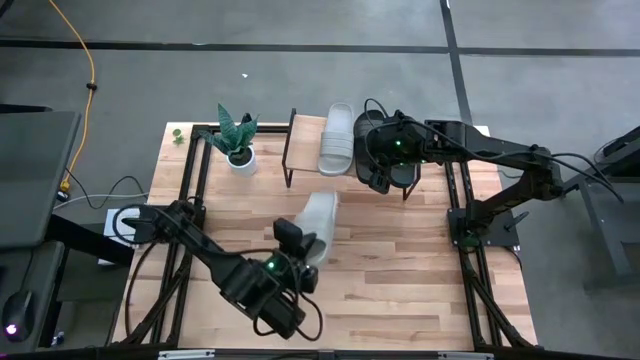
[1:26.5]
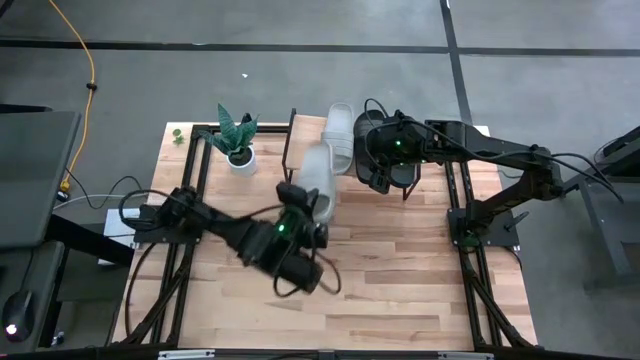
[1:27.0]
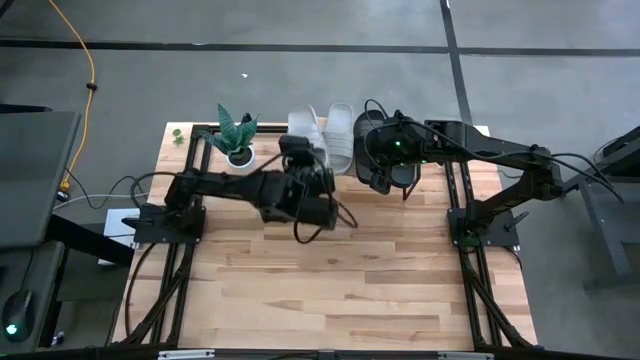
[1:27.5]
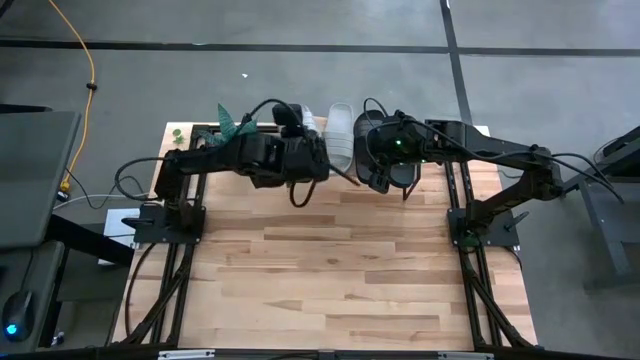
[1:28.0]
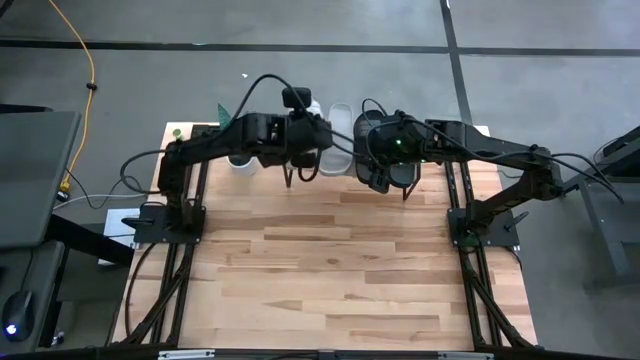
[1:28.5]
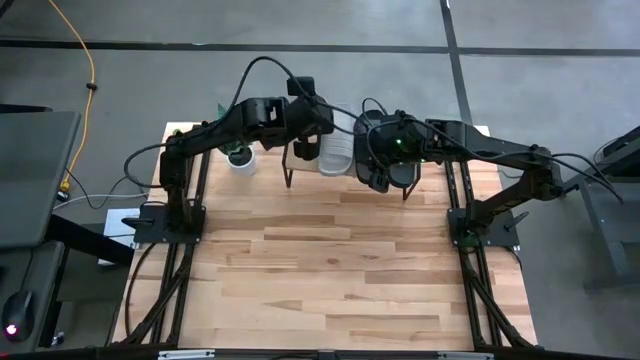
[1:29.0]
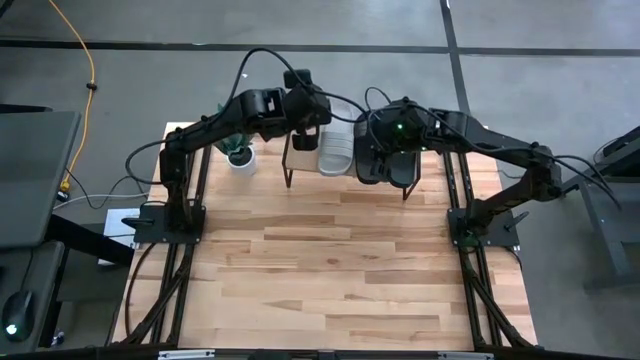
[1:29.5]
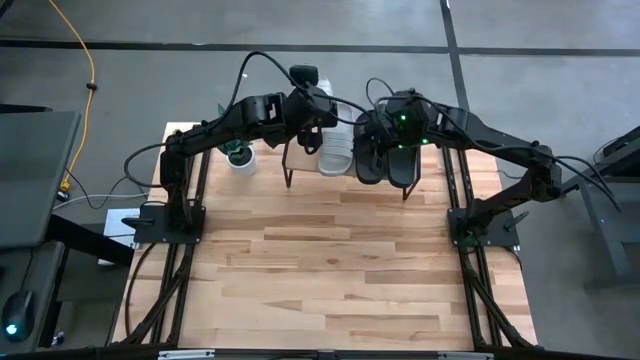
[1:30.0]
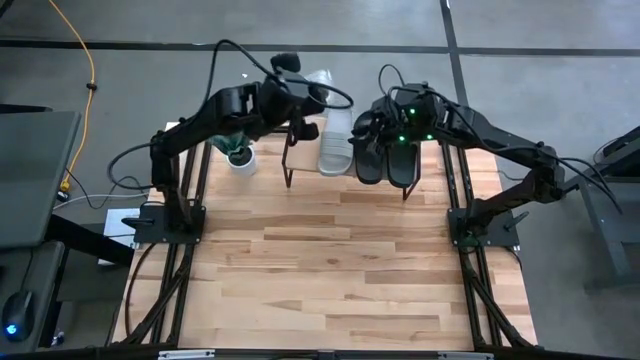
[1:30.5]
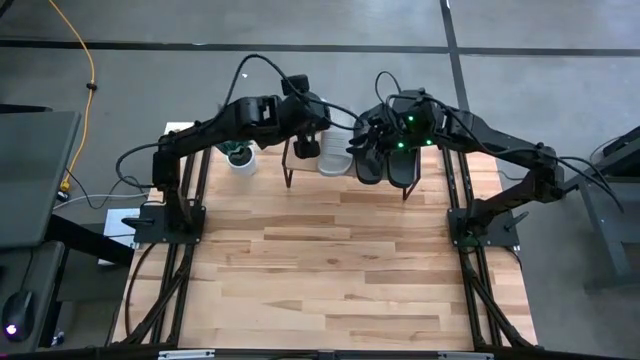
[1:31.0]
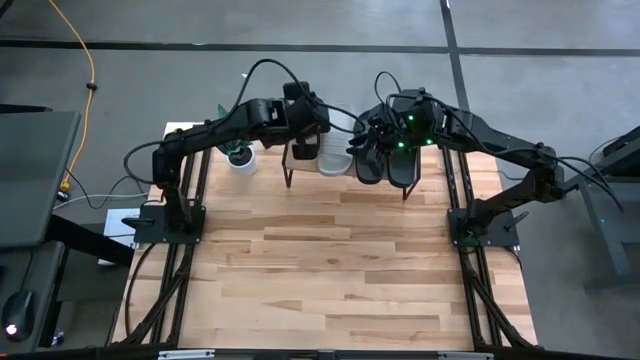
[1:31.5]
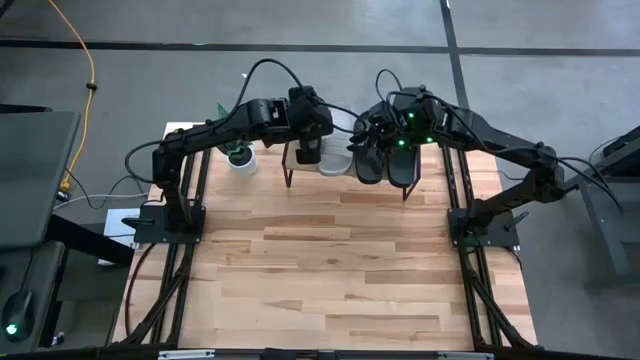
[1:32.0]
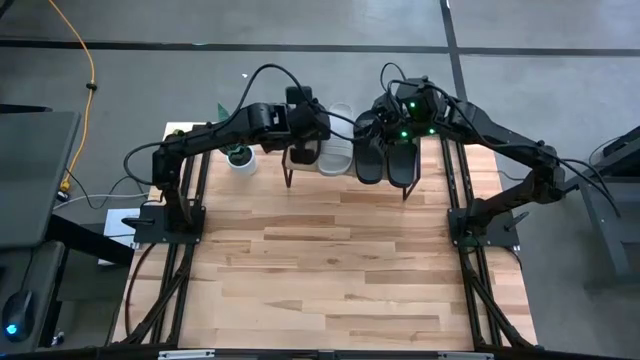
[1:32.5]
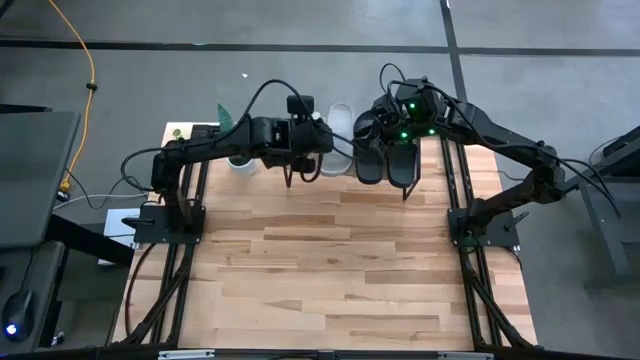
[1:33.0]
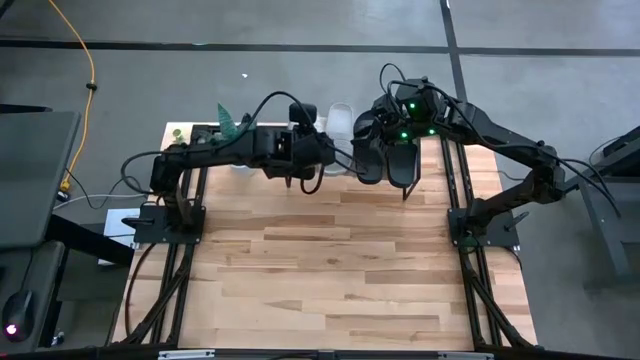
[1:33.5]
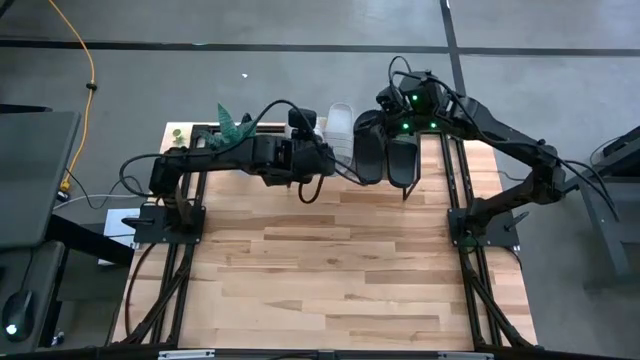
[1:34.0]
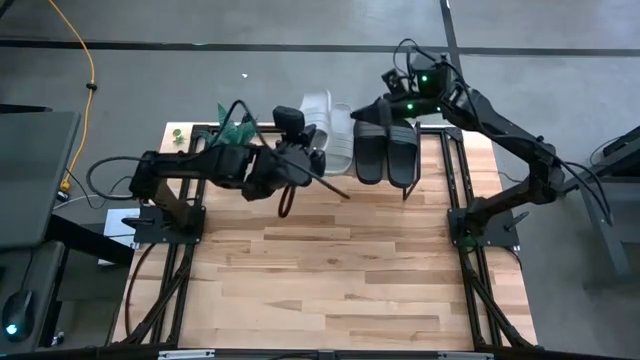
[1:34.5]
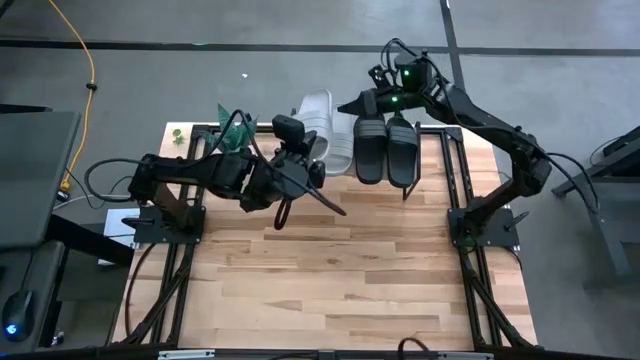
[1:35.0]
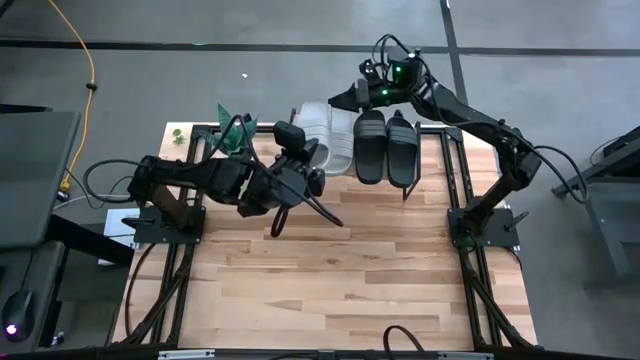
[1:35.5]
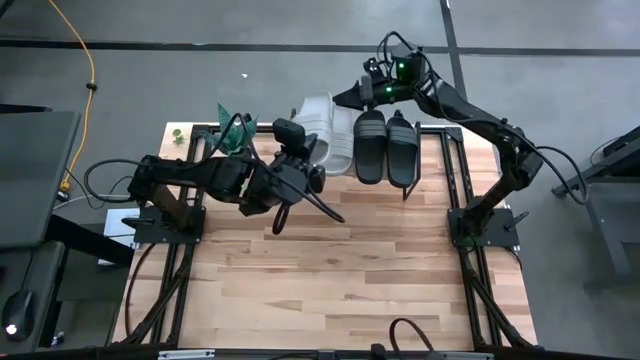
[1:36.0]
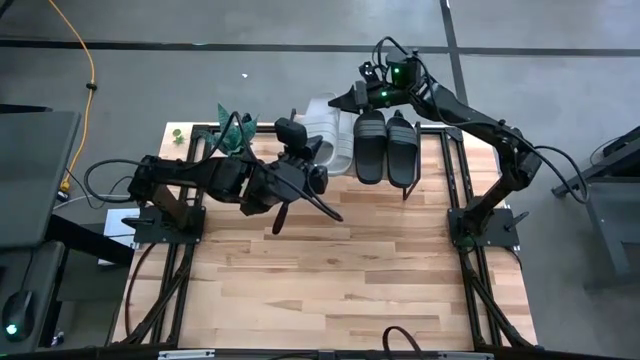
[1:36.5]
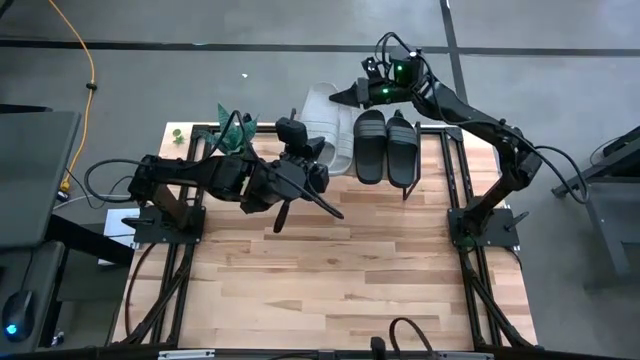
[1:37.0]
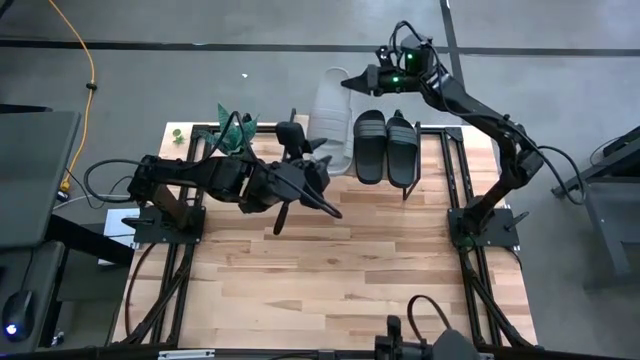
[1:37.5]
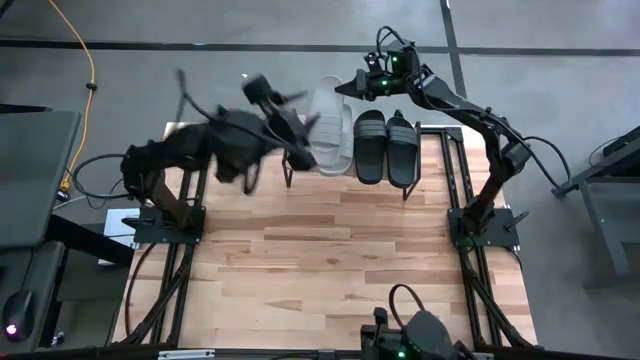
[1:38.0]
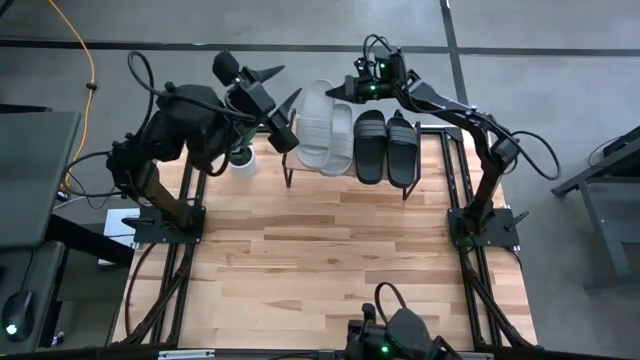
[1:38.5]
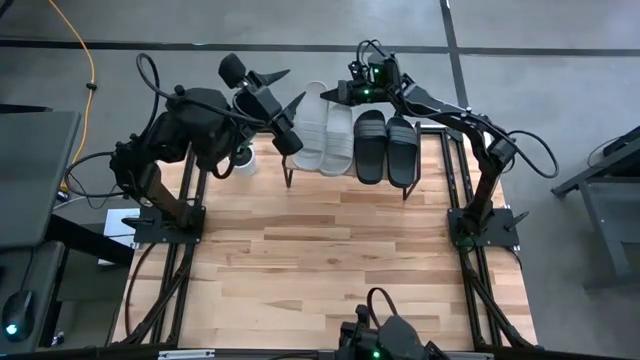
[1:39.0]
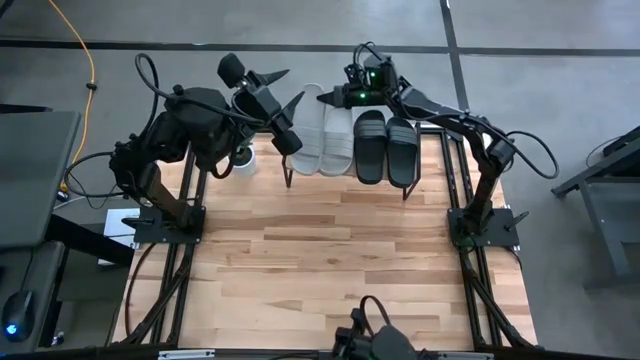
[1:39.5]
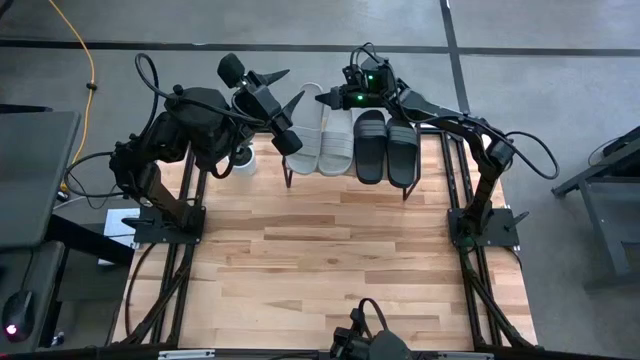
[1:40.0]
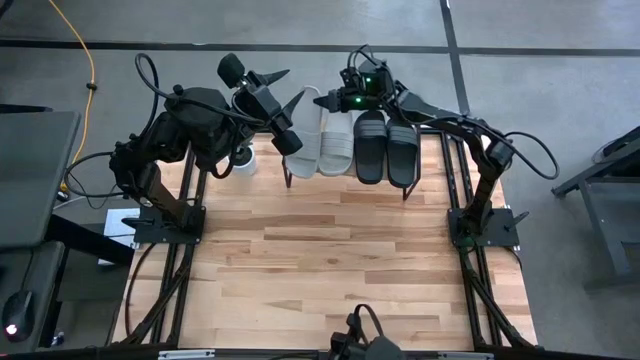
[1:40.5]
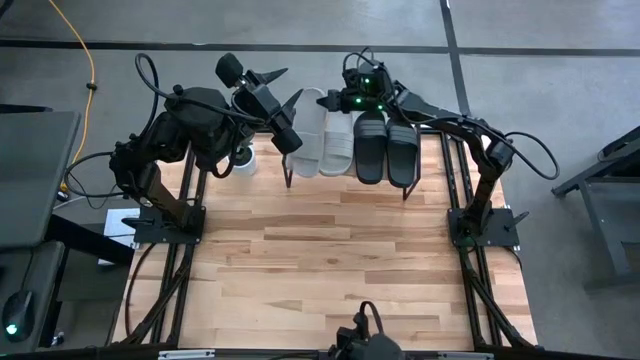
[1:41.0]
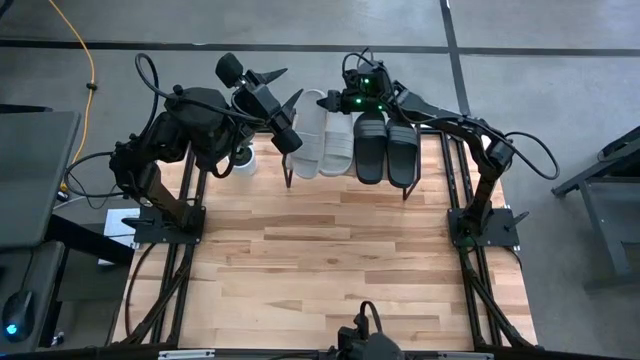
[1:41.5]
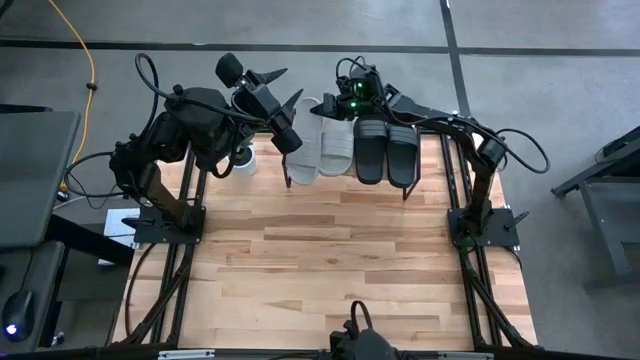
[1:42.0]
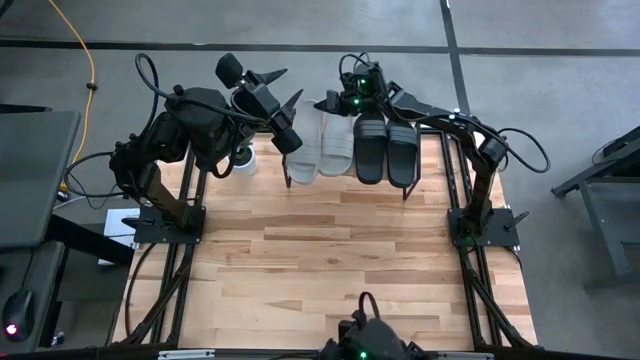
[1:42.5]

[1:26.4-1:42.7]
Task: Pick and place slides into the shelf
Put the gray slide on the shelf

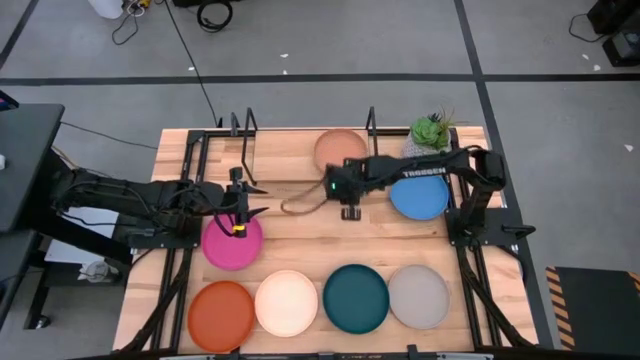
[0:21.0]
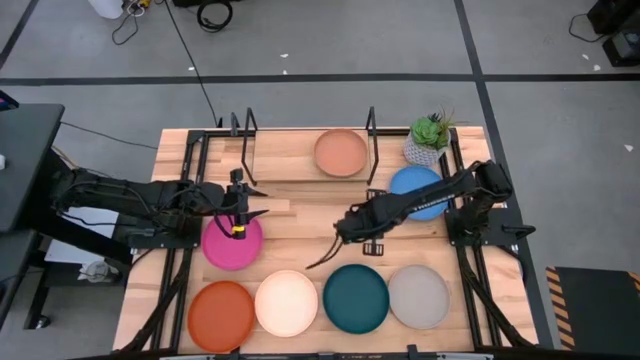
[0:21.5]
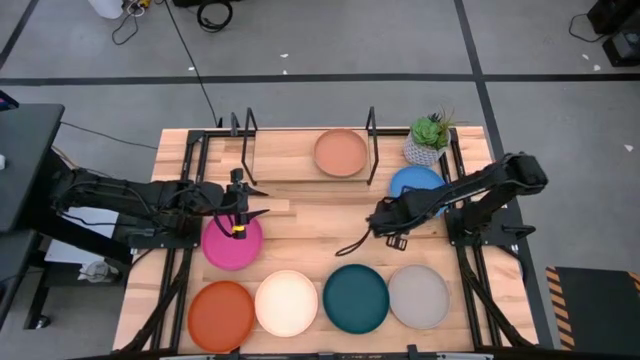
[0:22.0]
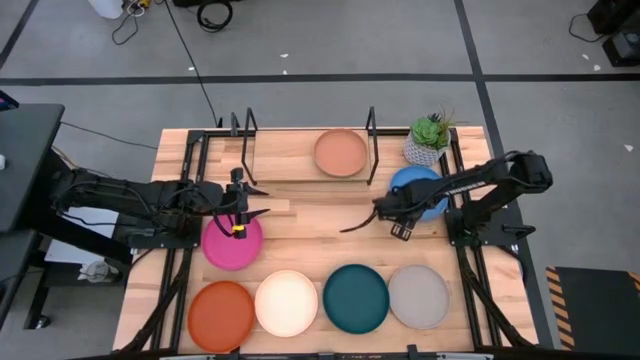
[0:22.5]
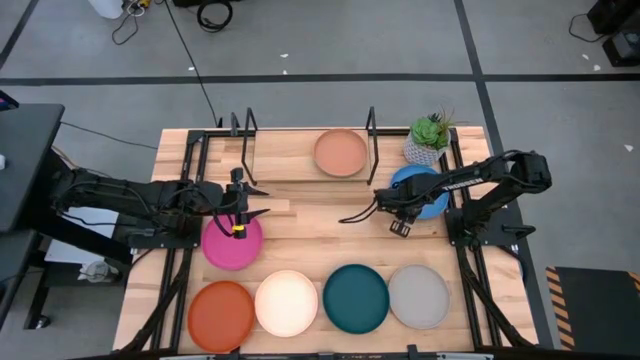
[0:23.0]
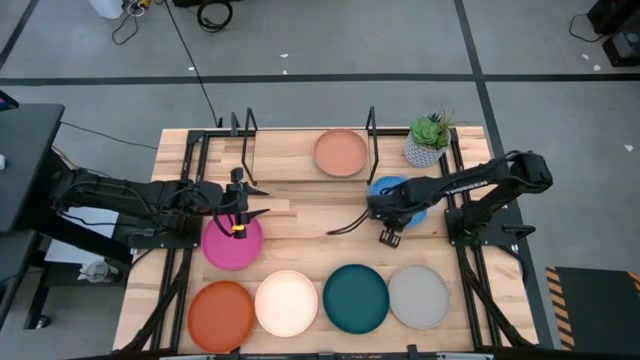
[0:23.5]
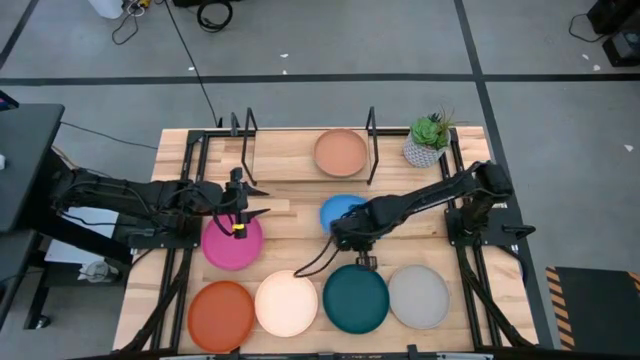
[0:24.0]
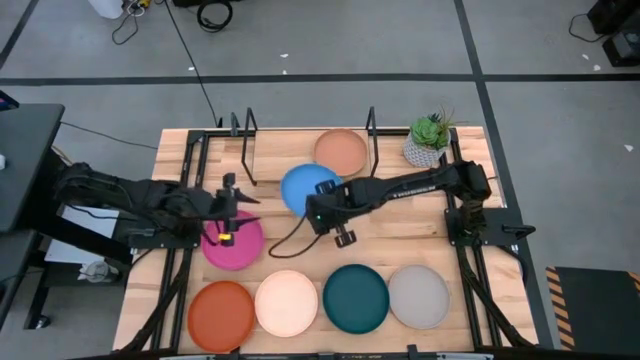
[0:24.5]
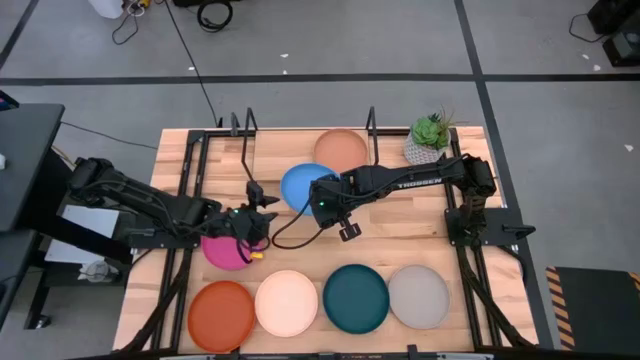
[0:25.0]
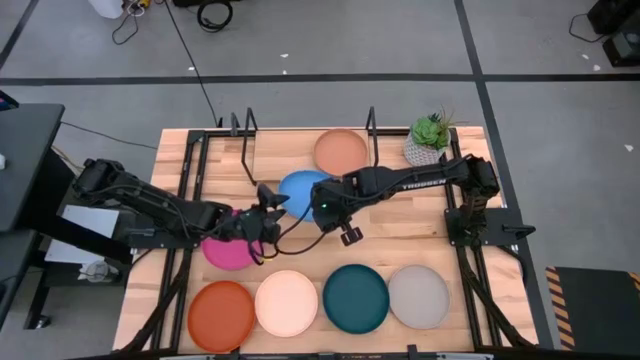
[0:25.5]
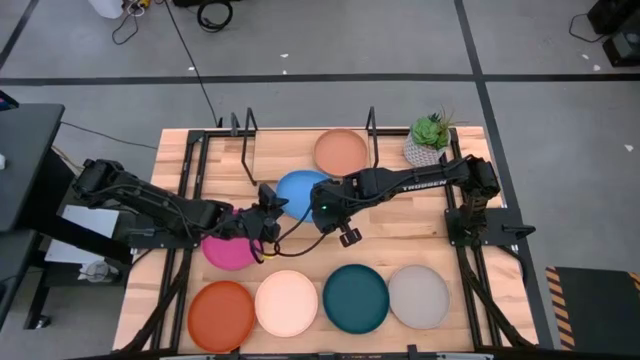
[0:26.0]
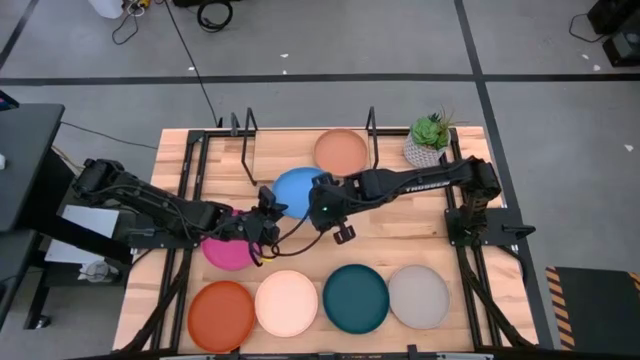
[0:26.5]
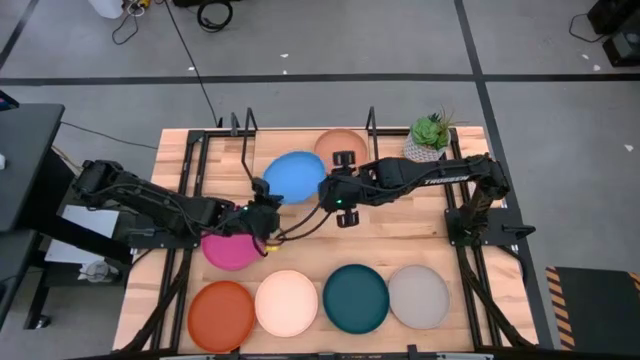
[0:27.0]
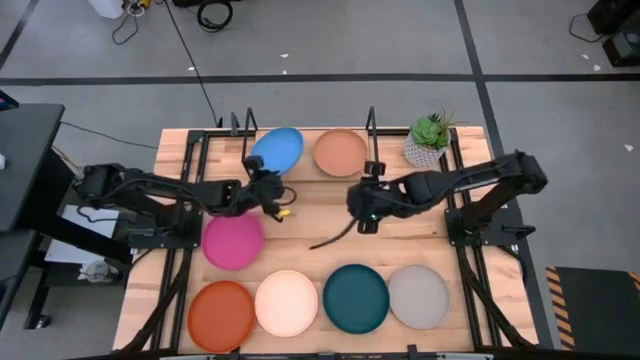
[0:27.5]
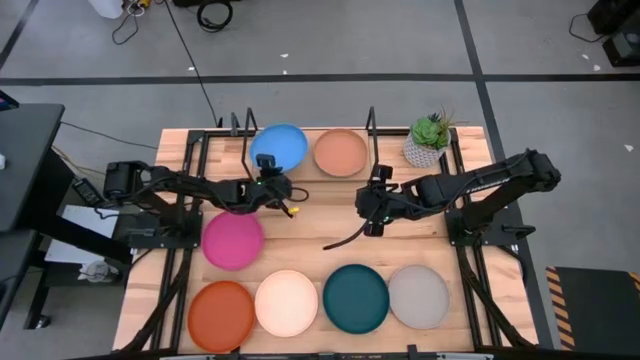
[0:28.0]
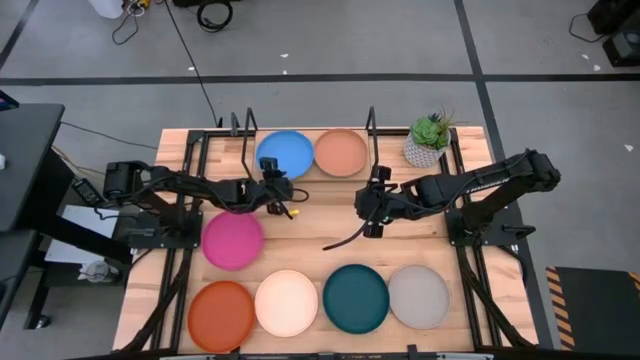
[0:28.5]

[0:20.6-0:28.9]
Task: Place and stack plates onto a shelf
Put the blue plate on the shelf
